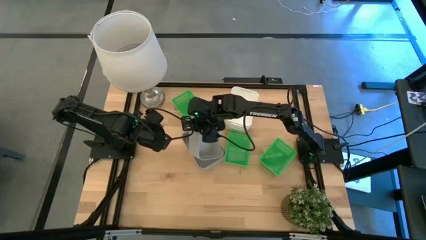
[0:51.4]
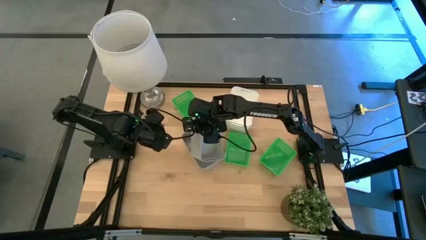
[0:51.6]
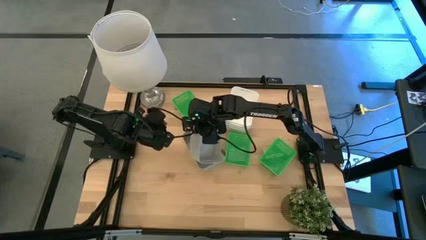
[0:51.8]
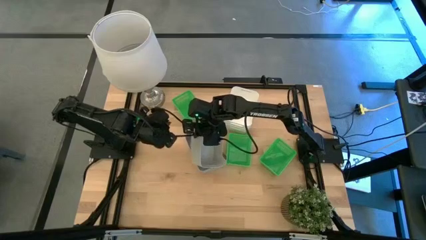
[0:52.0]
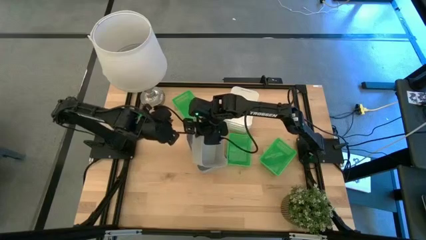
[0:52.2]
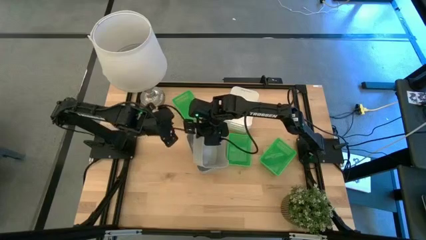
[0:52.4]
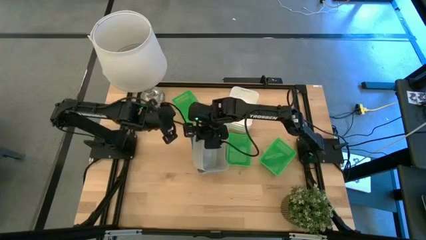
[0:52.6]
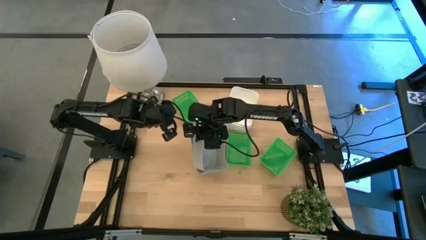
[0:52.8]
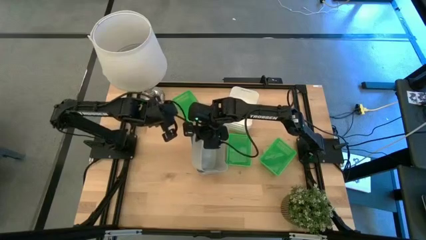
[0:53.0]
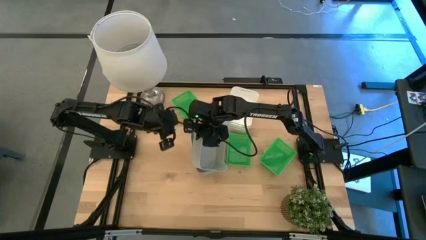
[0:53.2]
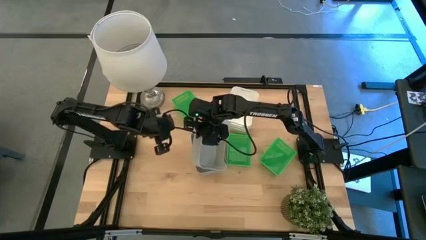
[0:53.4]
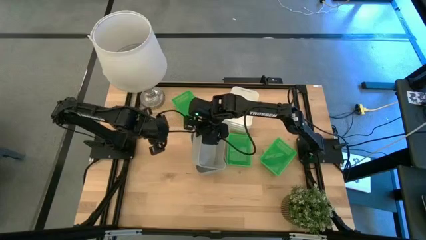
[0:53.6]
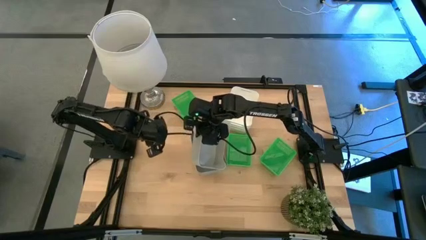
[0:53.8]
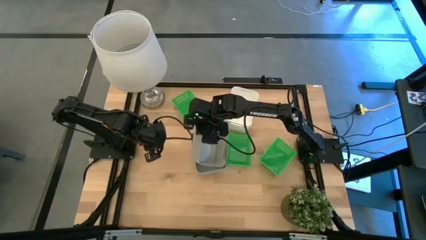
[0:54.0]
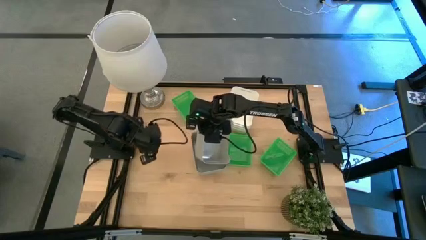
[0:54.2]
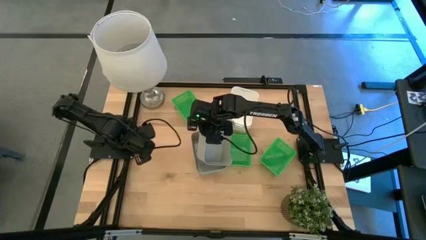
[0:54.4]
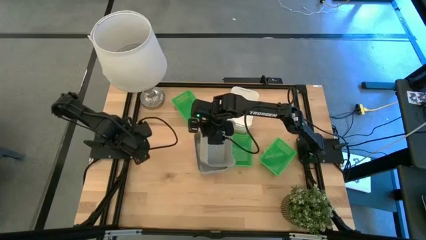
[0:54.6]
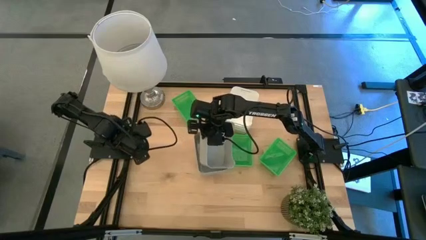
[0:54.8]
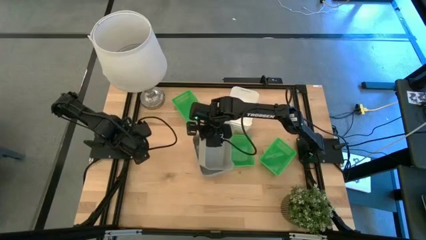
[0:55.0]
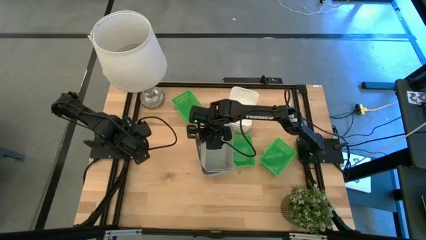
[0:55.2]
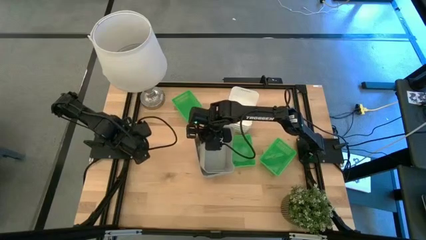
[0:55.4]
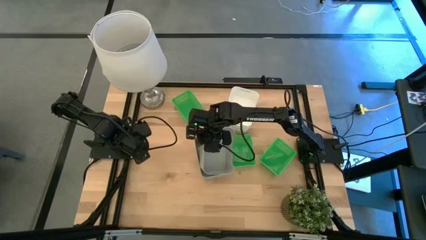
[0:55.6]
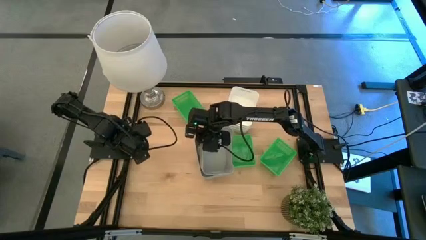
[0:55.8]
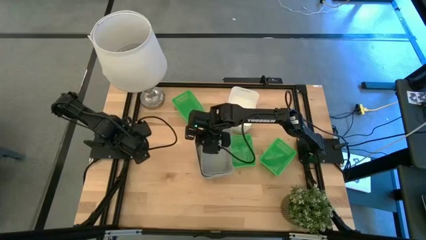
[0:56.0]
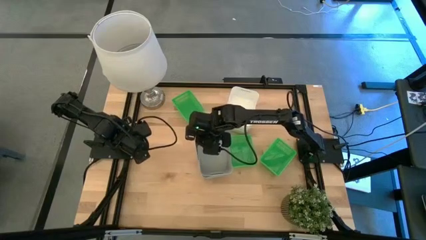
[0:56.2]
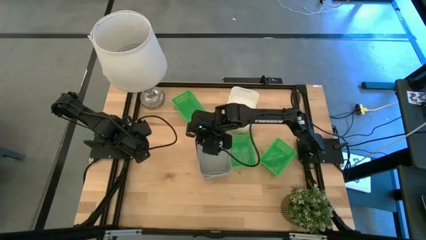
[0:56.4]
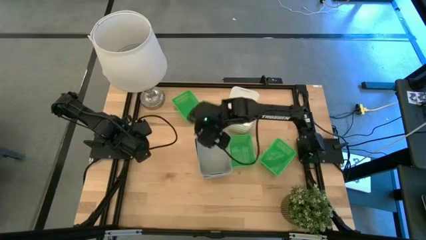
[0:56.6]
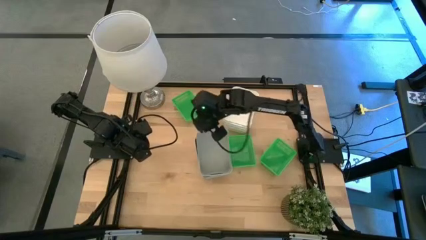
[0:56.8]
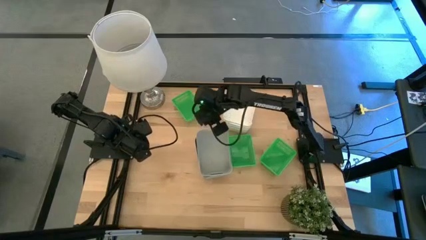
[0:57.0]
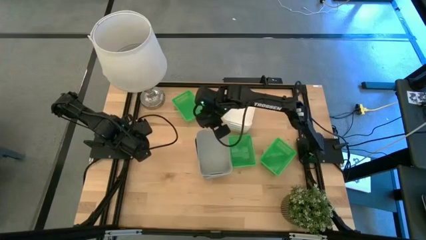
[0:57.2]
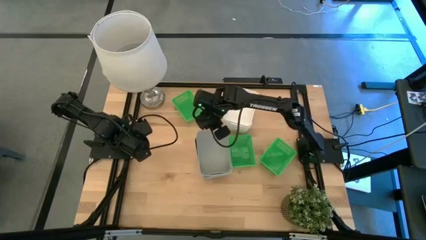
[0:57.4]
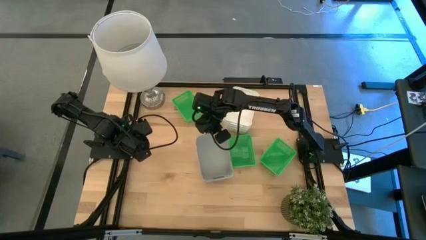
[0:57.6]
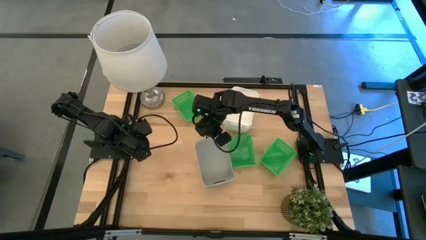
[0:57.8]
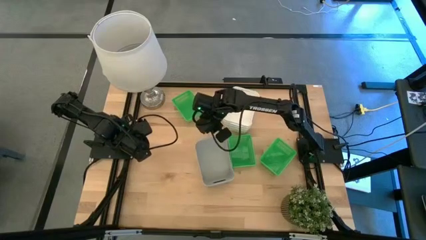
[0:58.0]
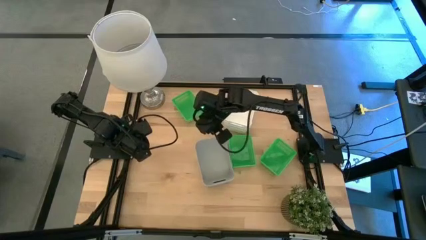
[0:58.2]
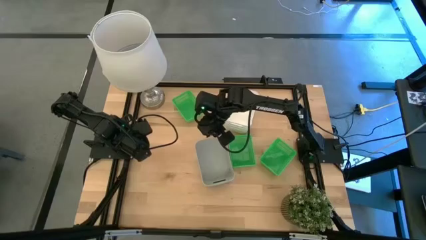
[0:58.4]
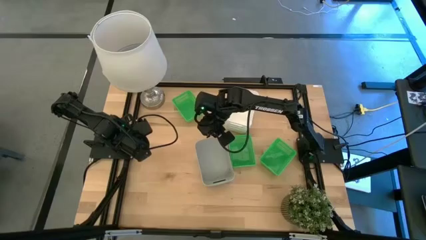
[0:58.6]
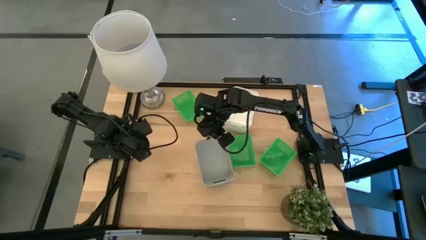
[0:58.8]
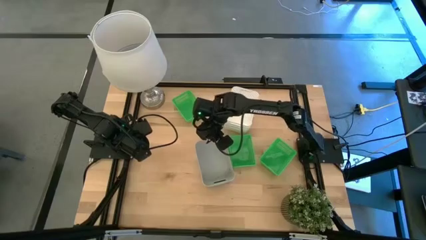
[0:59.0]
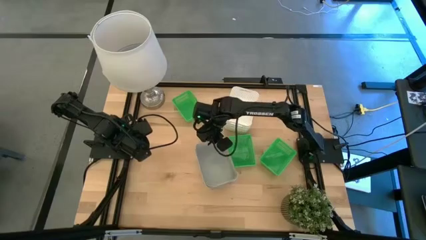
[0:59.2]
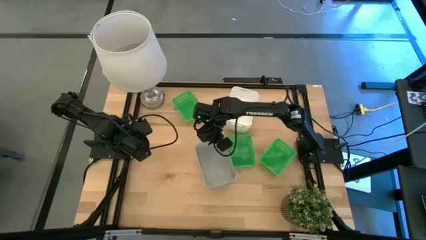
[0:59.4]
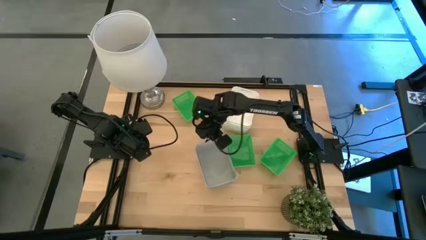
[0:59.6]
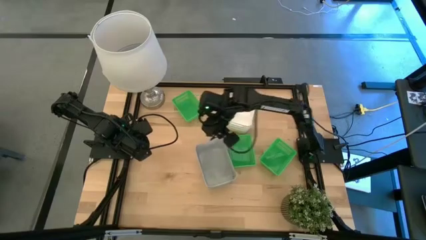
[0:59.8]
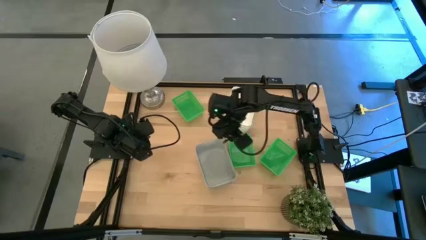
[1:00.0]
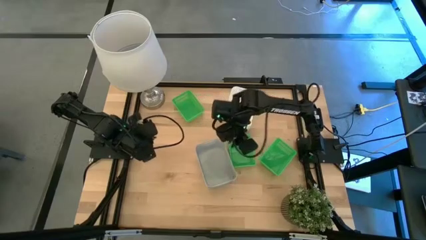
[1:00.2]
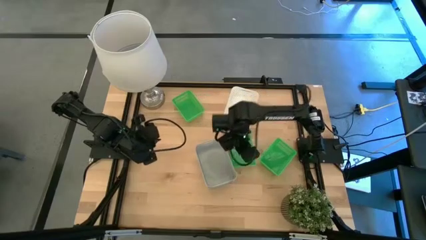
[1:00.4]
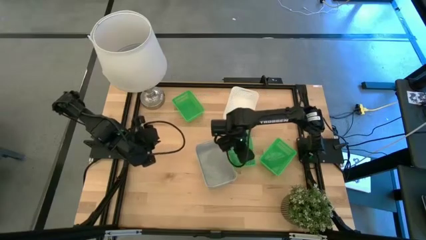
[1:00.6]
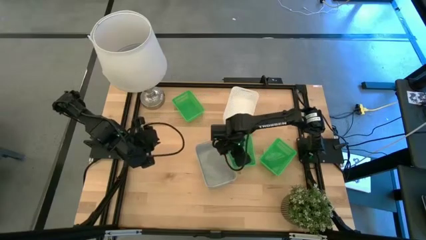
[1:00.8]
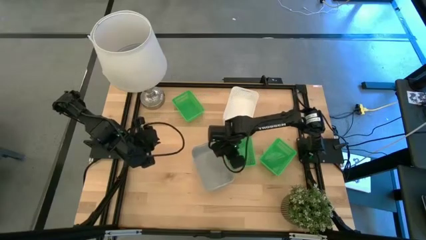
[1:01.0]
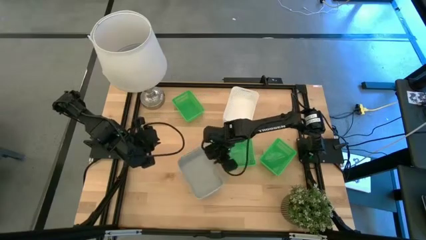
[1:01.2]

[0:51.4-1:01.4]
Stack the bottom gray bin on top of the top gray bin

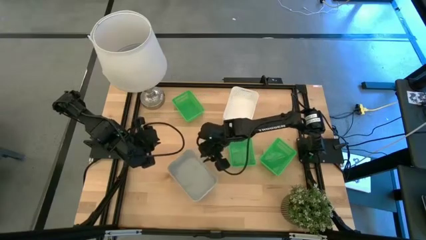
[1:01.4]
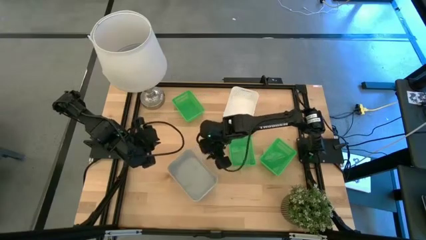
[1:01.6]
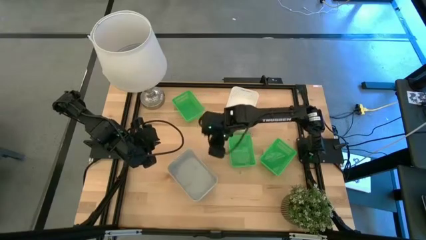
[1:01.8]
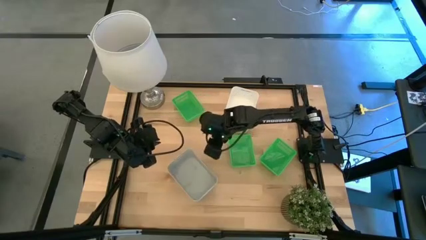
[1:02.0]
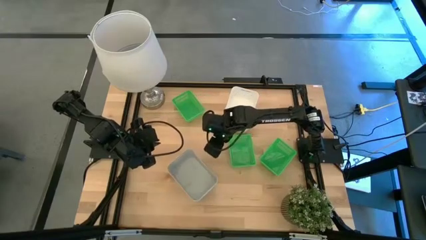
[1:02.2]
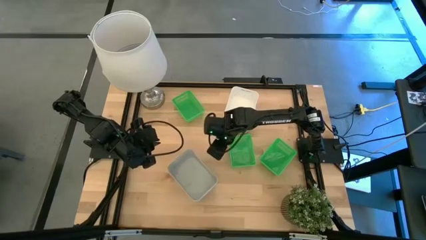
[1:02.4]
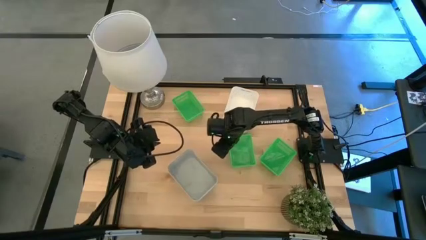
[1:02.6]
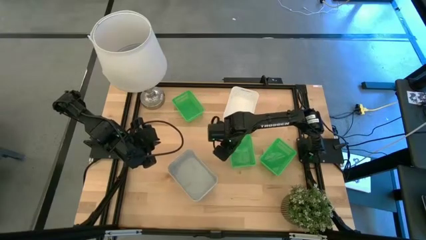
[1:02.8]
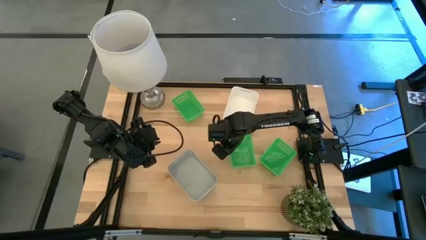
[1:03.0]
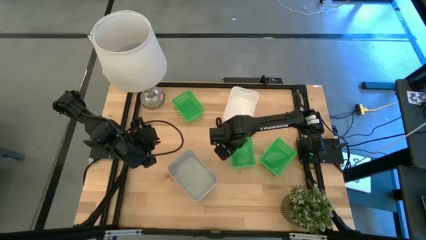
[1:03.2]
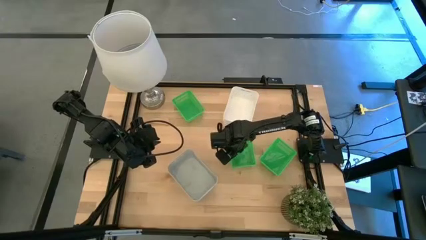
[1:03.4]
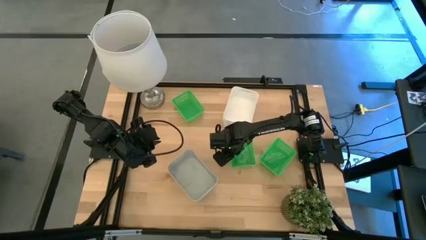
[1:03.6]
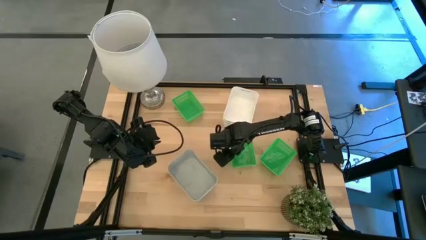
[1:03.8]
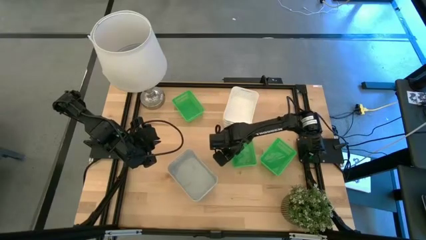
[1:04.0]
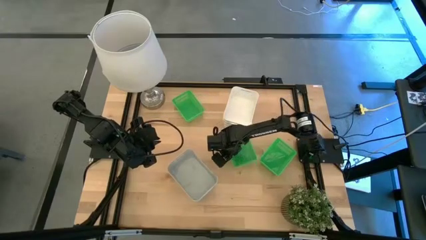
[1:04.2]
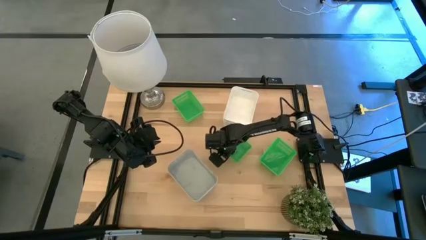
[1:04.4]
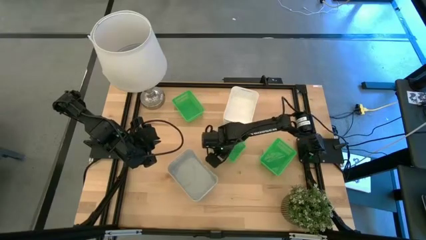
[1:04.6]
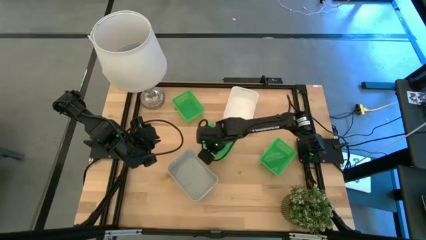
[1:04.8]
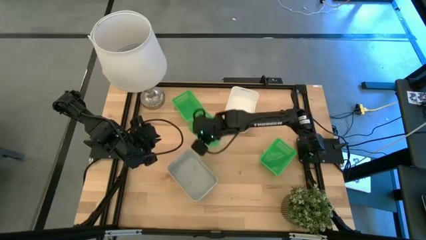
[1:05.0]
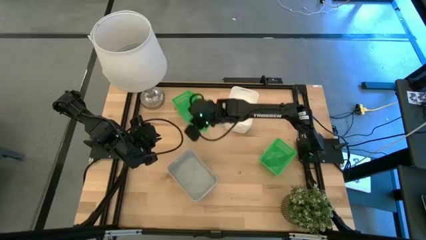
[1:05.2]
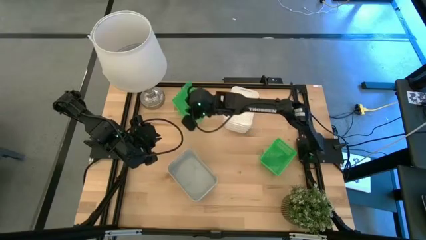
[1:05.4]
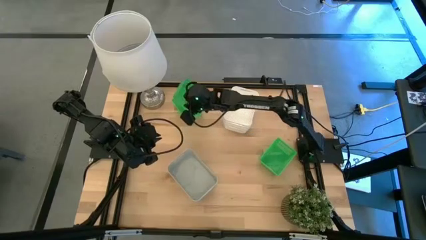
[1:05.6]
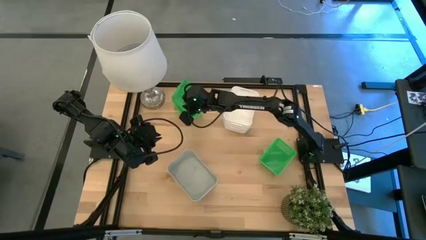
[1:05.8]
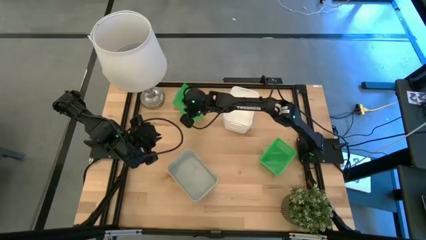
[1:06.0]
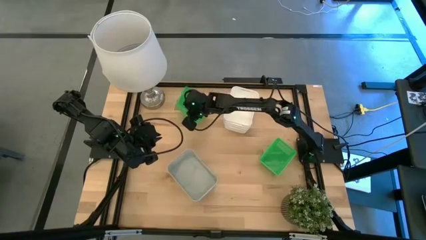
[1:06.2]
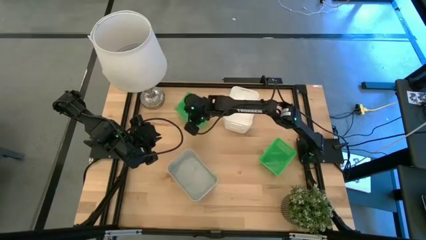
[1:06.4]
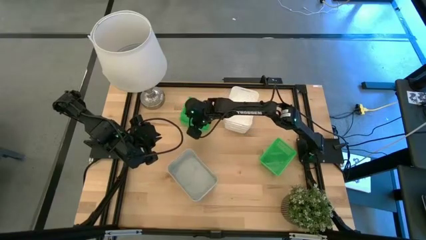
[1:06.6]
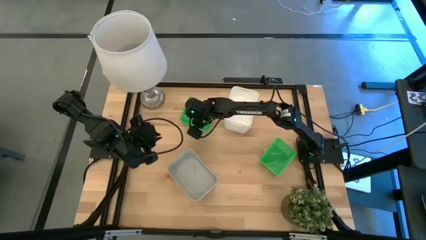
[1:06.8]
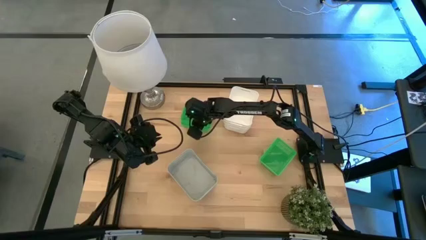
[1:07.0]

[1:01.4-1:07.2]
Stack the middle green bin on top of the top green bin
